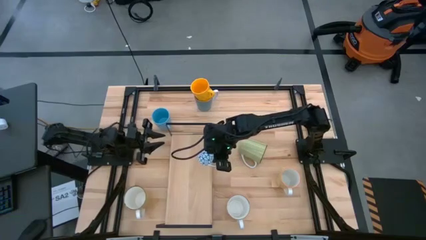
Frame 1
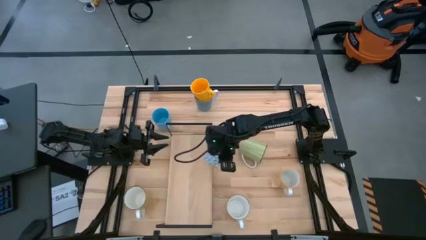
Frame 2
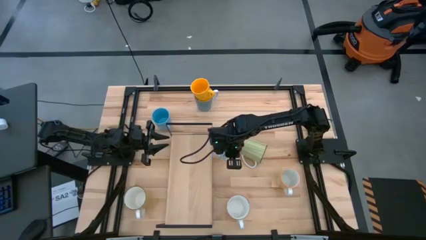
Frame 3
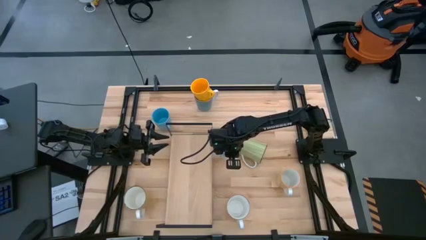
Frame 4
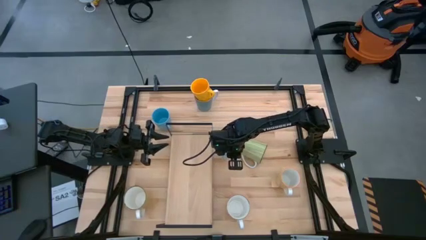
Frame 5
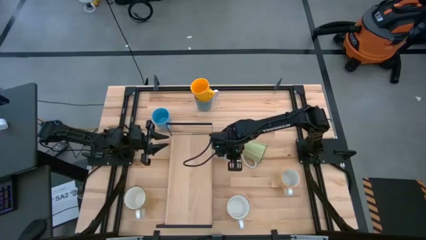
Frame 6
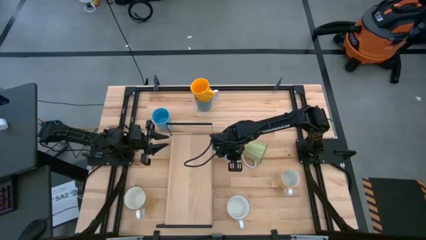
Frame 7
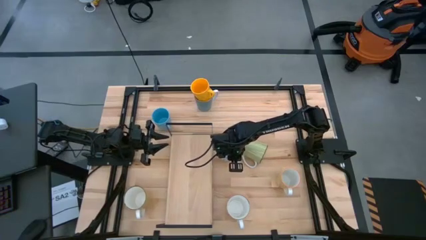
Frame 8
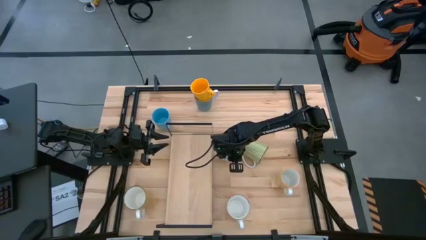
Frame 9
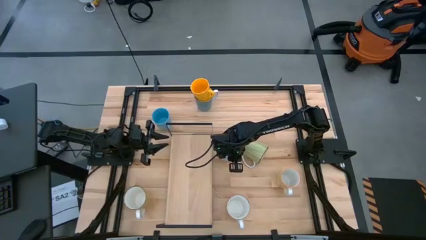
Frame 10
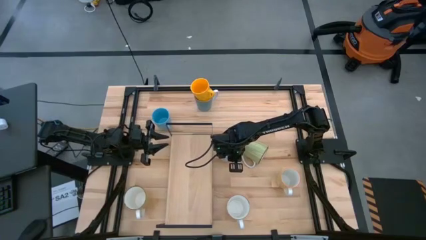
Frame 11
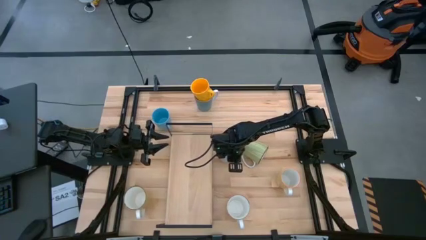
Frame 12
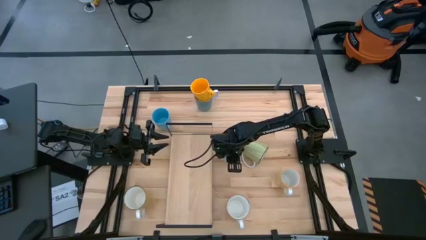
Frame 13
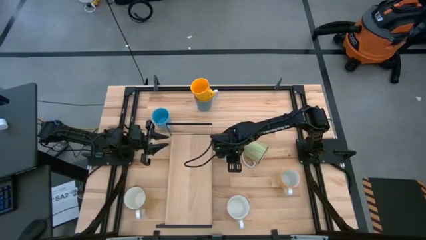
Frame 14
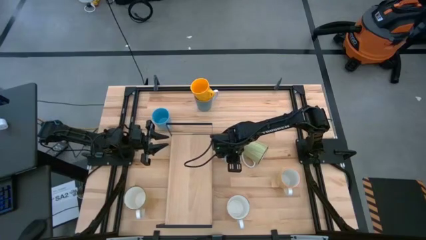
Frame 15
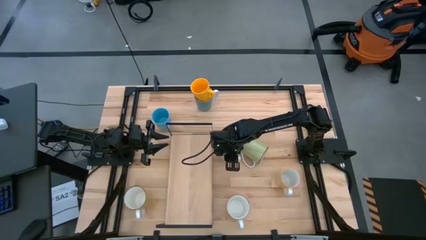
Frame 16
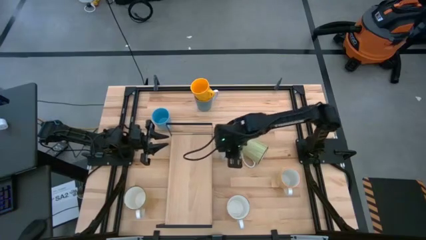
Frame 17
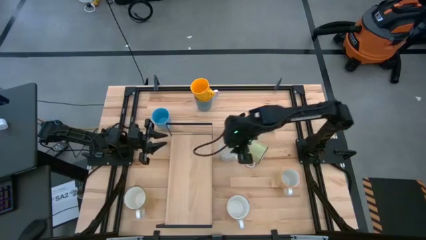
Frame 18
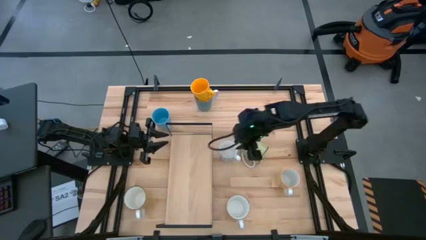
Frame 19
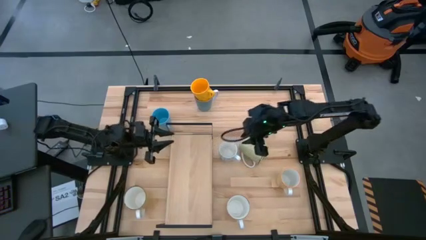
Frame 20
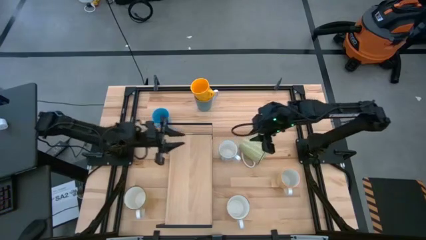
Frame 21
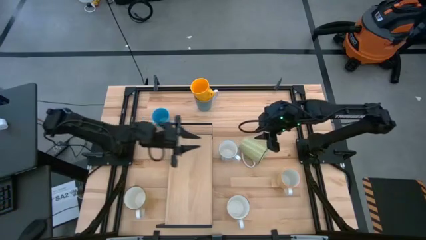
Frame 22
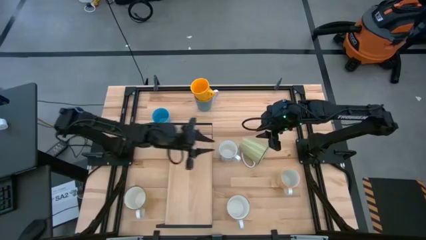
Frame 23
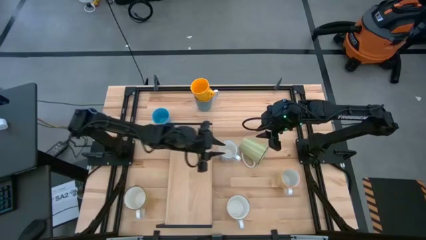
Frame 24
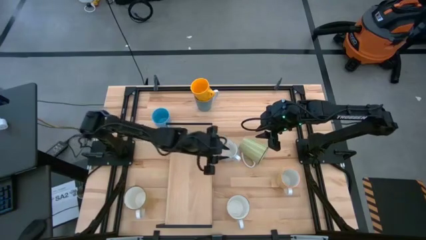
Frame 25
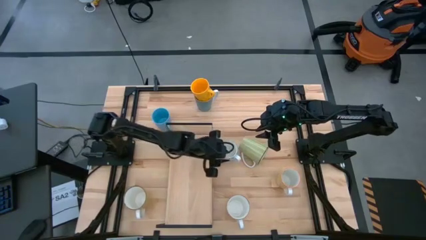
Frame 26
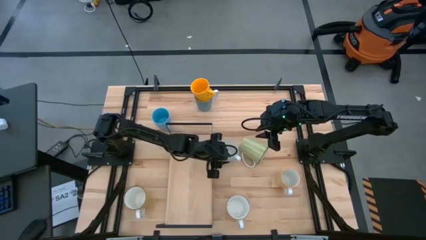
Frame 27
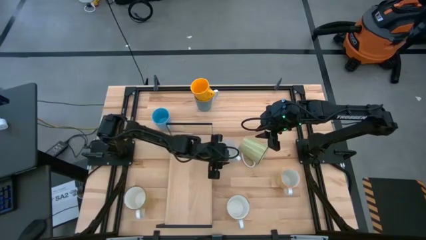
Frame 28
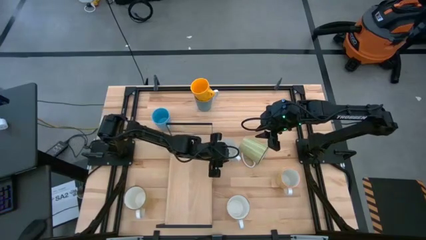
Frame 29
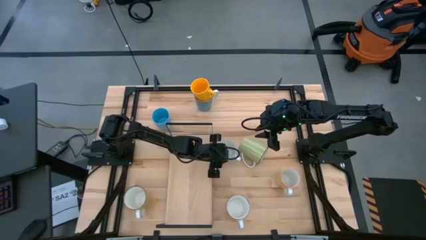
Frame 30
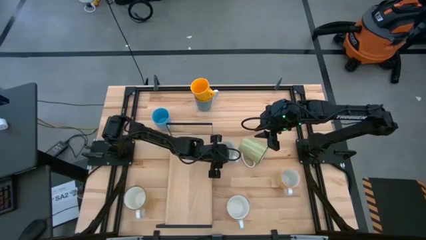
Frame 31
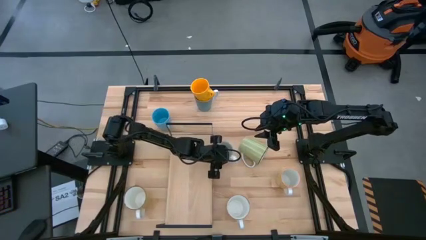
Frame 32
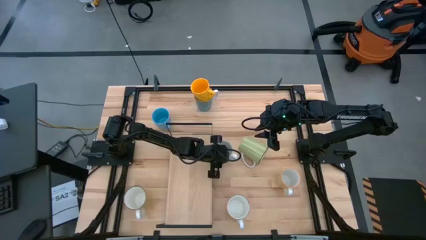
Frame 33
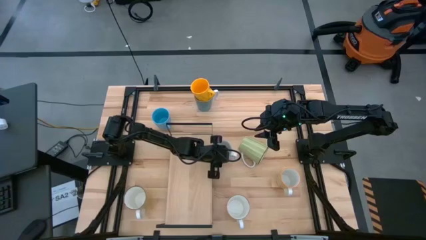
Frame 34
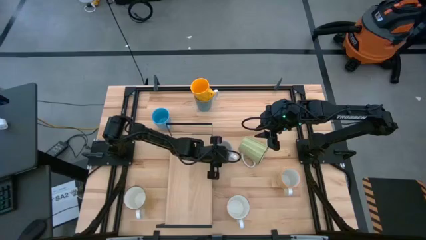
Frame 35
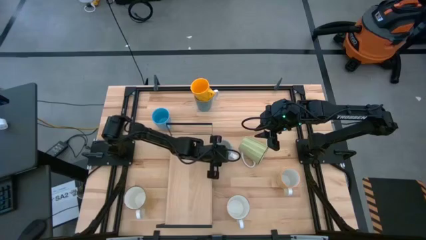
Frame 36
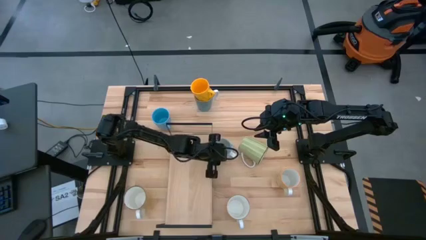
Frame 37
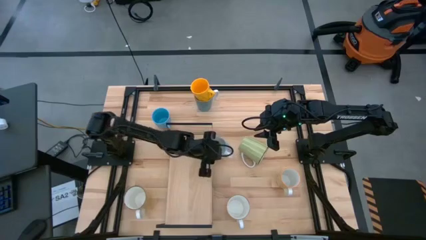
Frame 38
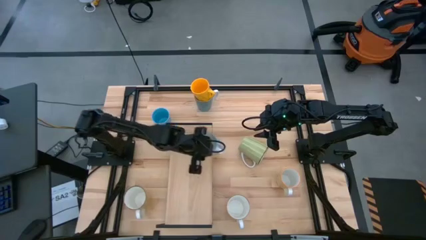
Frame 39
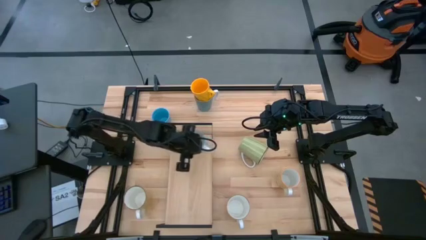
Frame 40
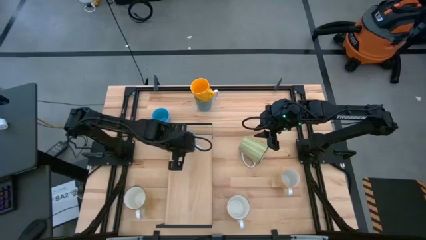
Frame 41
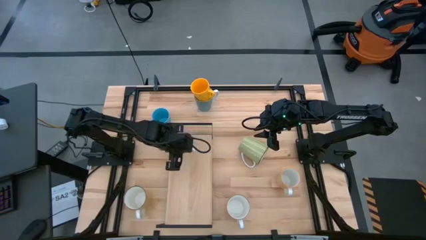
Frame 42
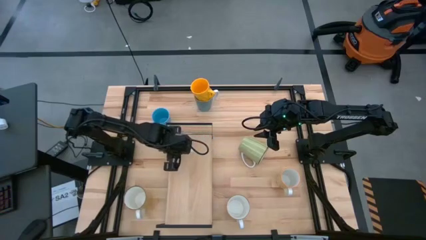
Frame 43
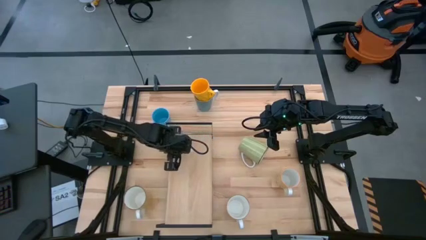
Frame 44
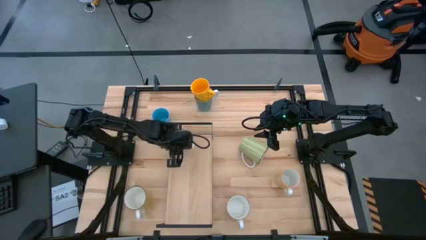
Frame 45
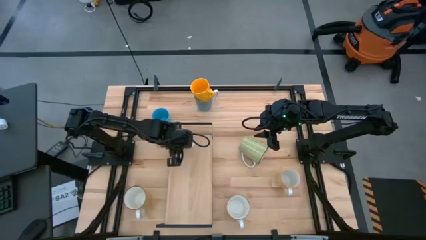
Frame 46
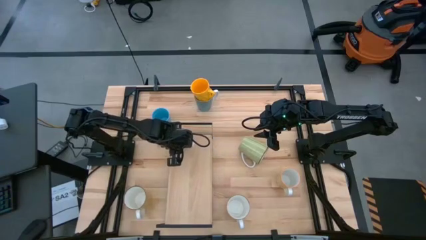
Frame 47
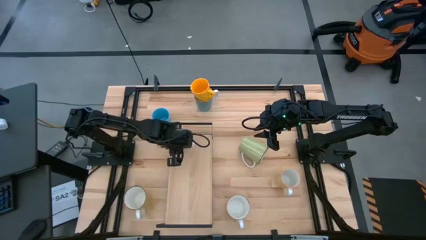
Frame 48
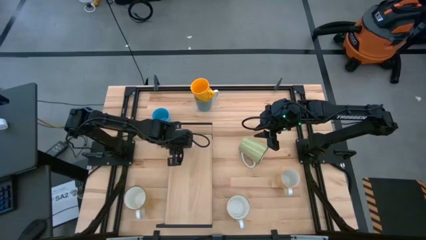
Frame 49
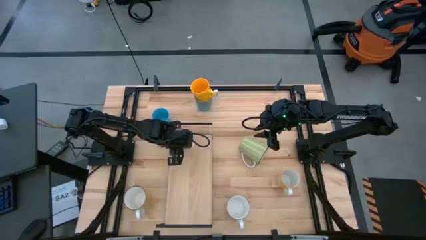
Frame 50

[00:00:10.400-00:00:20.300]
Task: Place coffee mugs
Put the white blue mug on the shelf

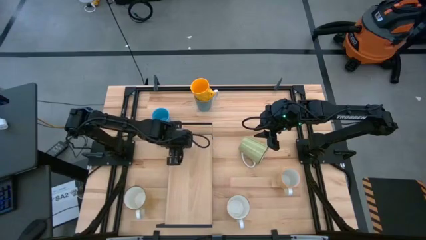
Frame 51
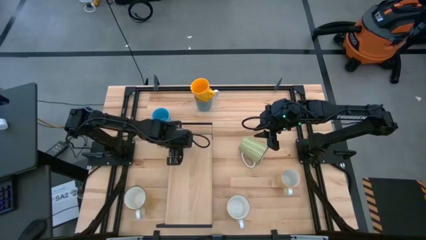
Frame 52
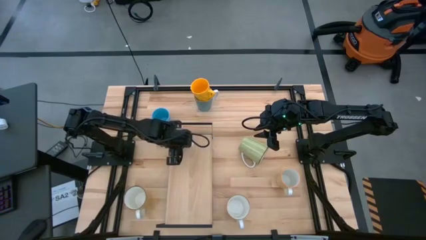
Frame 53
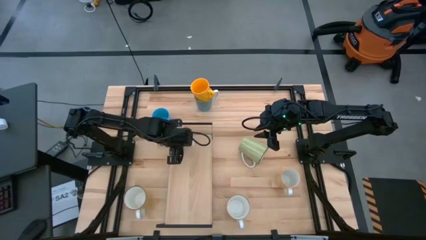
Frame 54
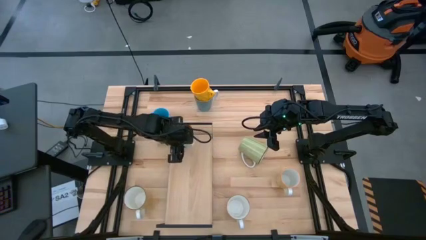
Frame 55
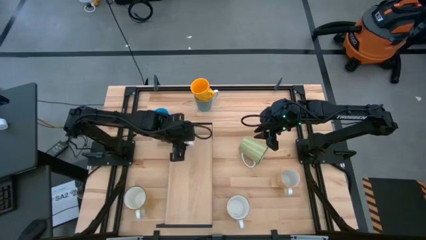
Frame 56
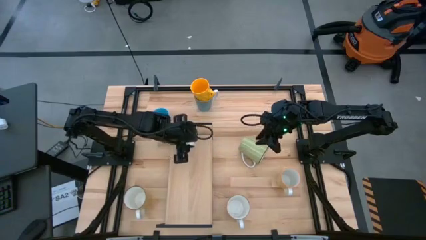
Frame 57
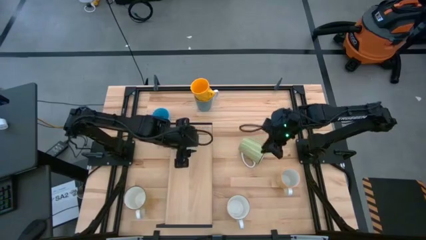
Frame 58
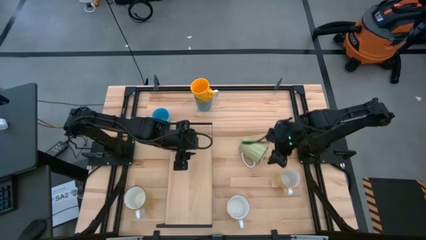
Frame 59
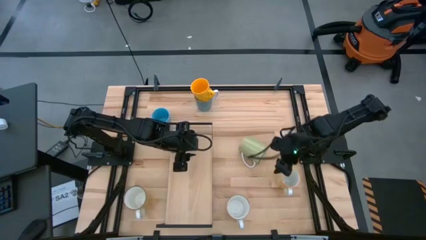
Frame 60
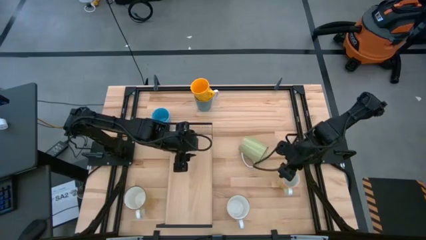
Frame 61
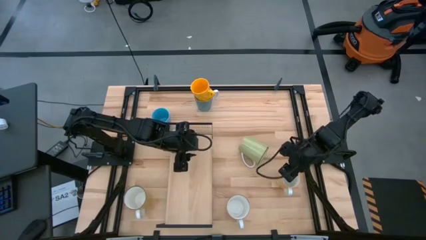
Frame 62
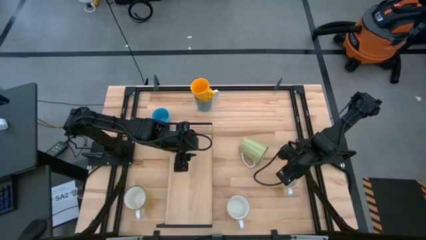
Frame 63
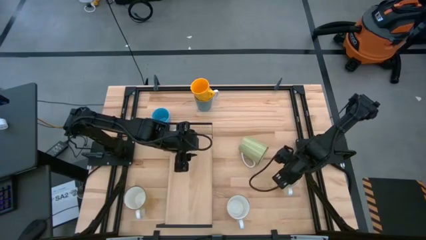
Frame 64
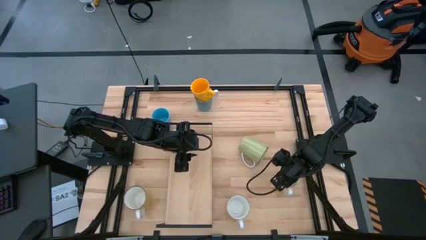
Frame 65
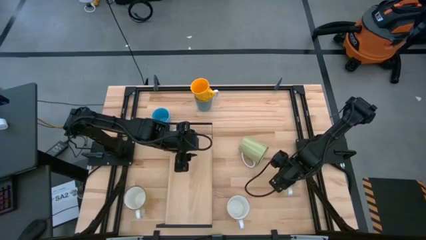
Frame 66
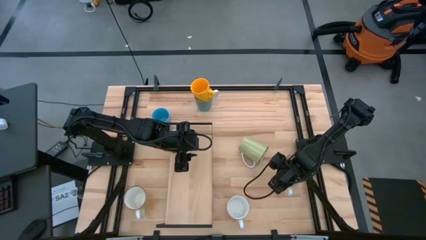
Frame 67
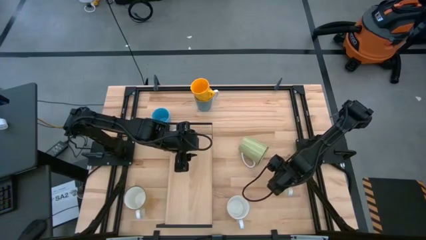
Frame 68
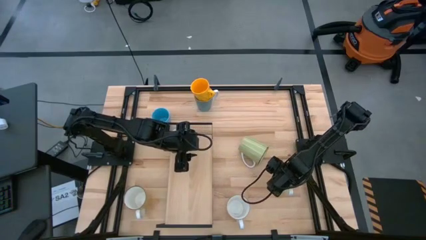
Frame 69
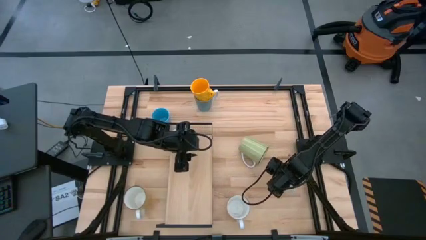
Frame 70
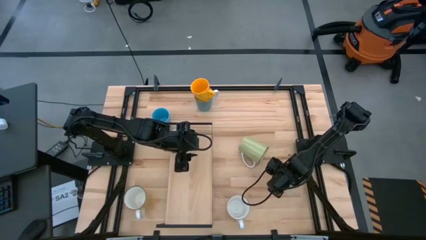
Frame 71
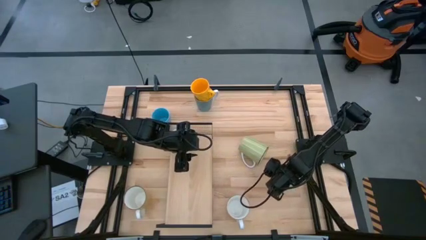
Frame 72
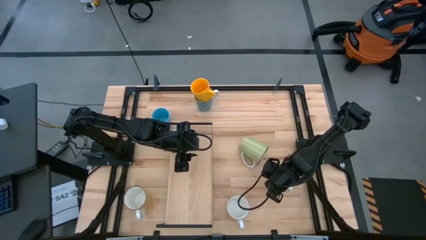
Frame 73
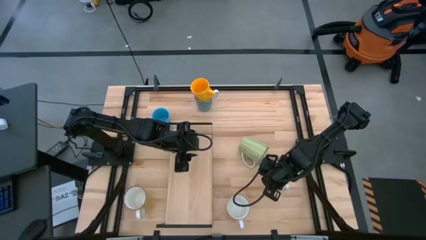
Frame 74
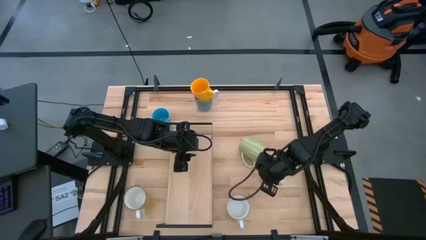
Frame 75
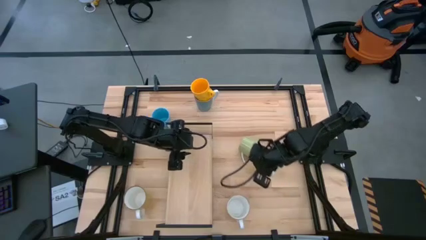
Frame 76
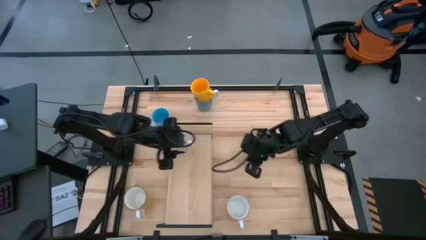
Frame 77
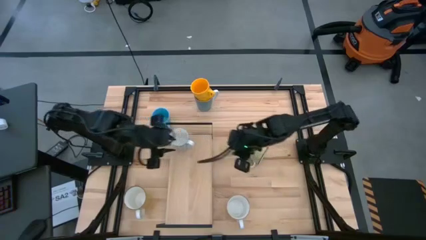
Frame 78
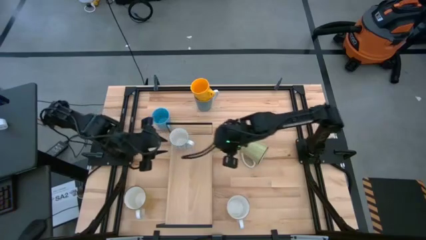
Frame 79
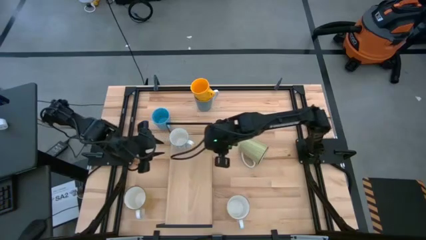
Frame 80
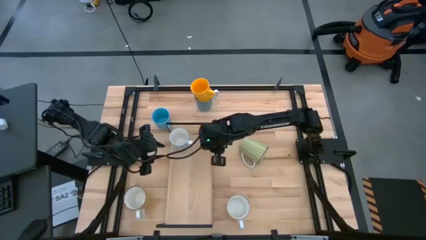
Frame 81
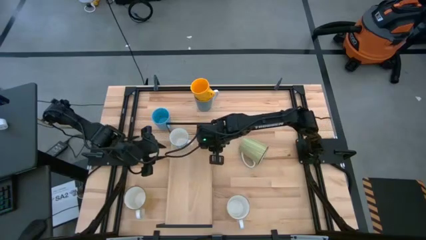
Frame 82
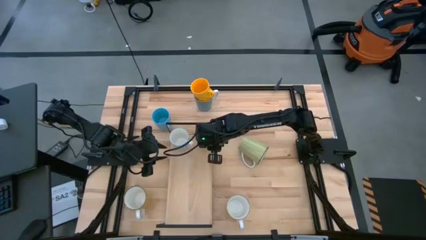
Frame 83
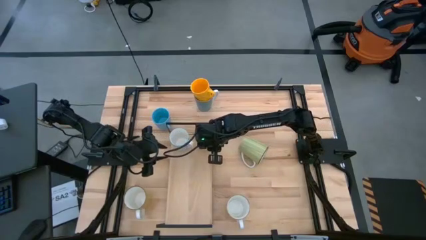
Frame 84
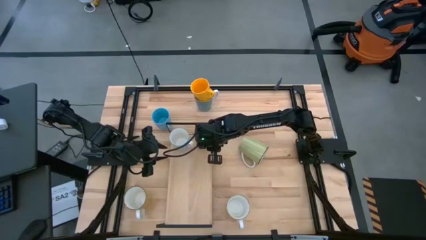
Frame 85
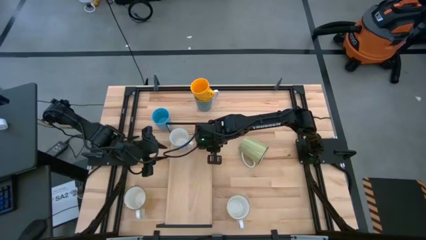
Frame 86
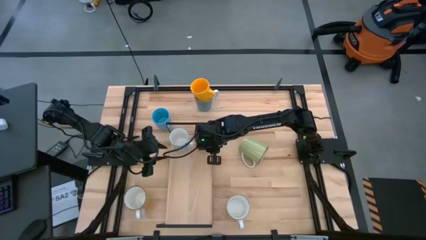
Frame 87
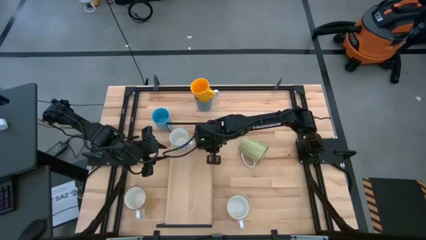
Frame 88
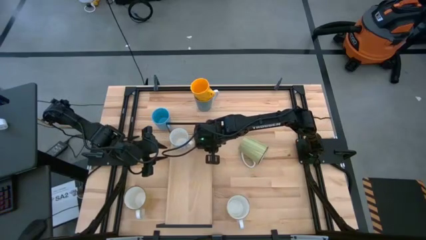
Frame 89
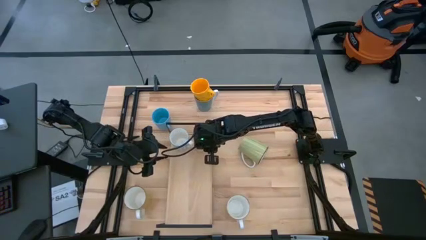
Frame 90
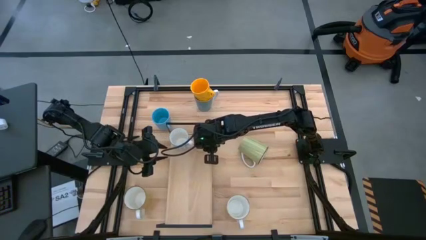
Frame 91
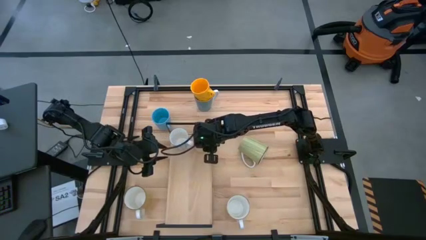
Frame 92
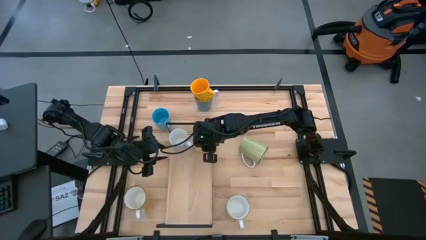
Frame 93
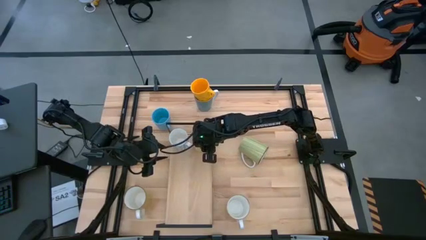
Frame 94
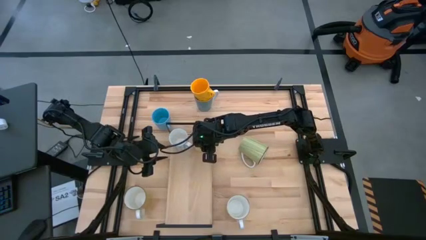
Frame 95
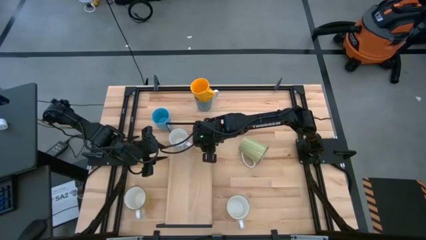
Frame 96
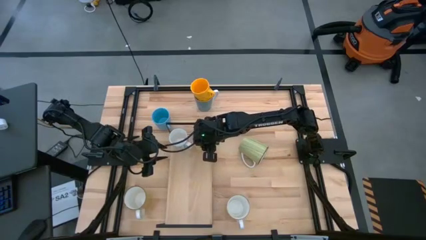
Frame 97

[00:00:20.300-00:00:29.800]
Put the yellow patterned mug on the shelf
